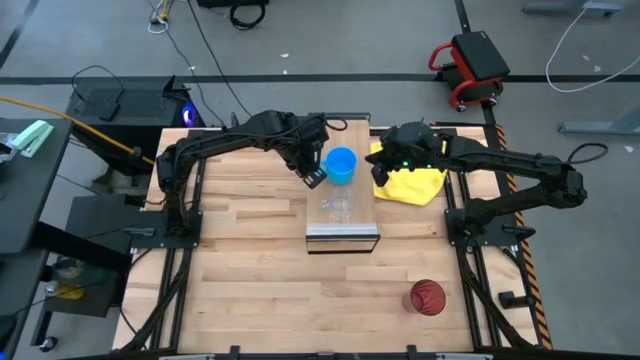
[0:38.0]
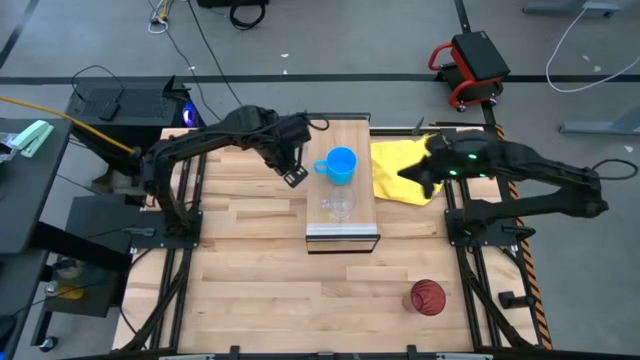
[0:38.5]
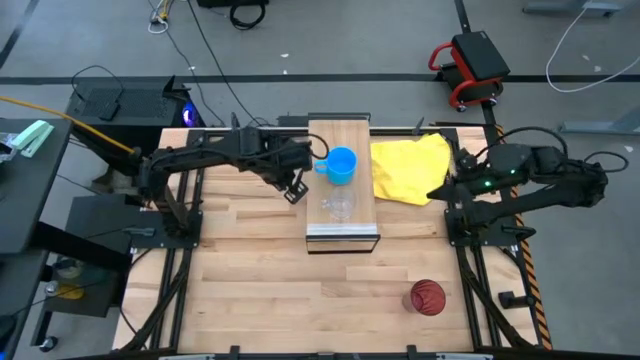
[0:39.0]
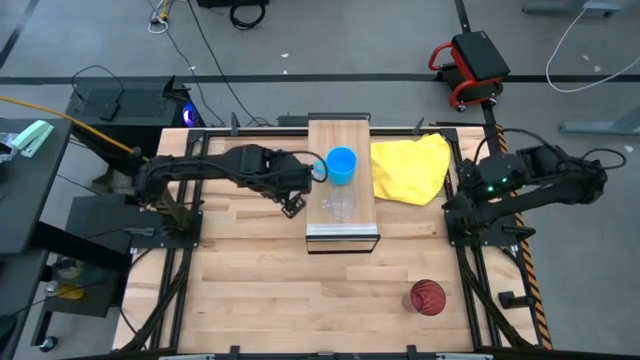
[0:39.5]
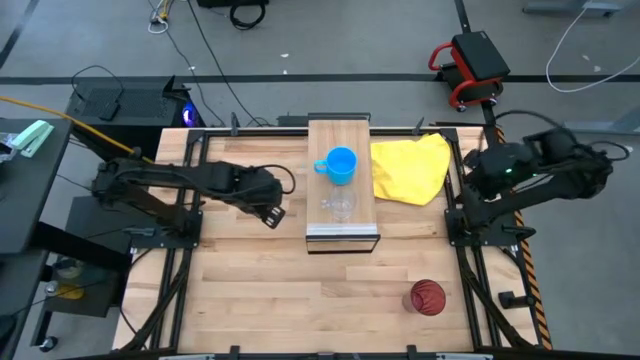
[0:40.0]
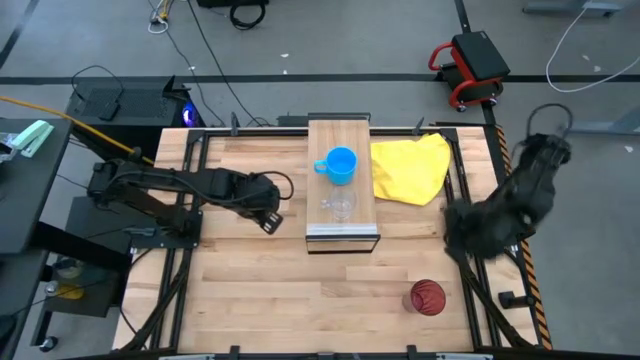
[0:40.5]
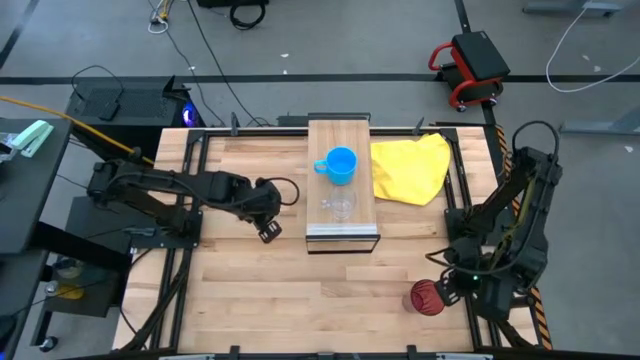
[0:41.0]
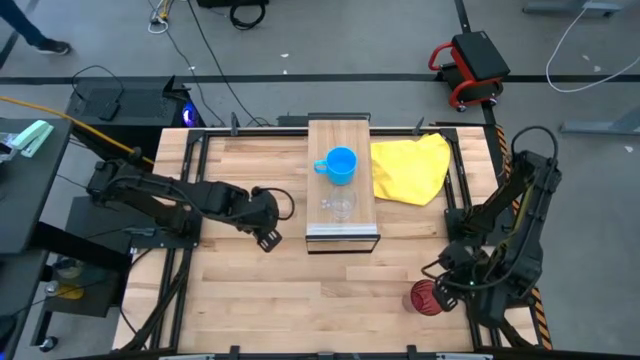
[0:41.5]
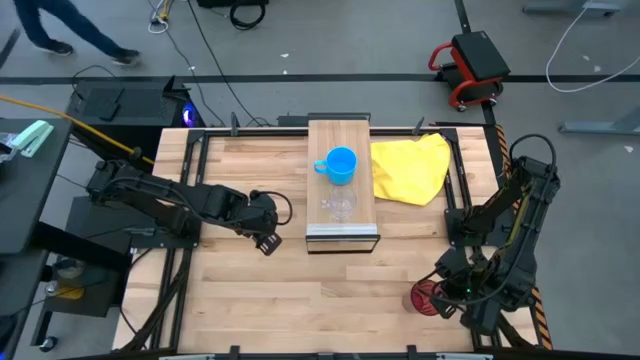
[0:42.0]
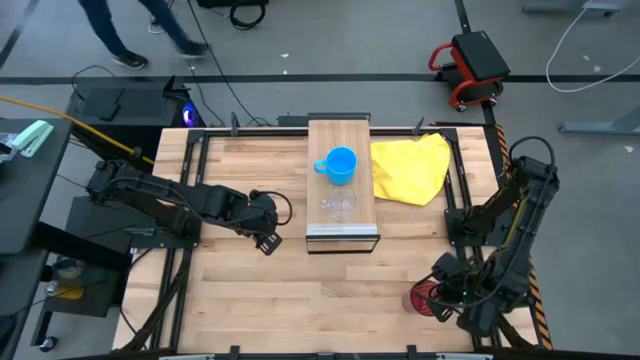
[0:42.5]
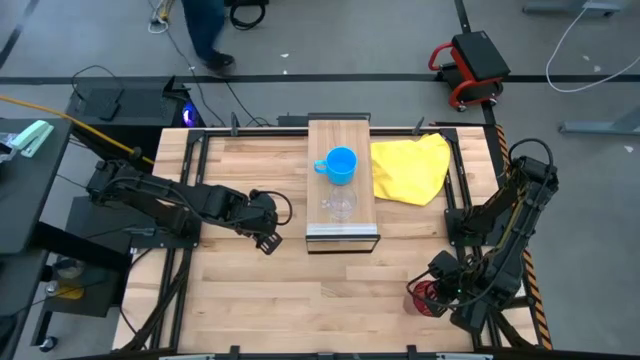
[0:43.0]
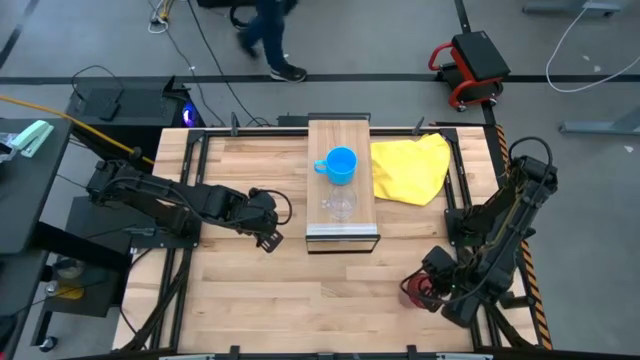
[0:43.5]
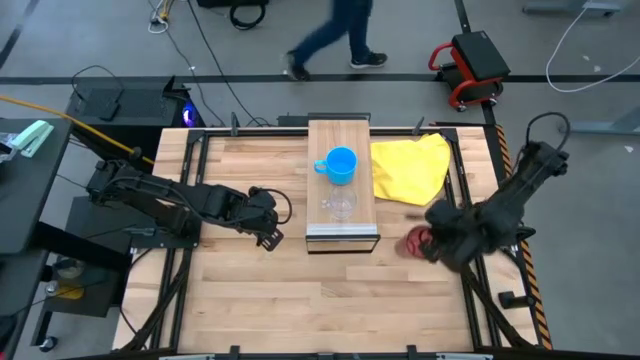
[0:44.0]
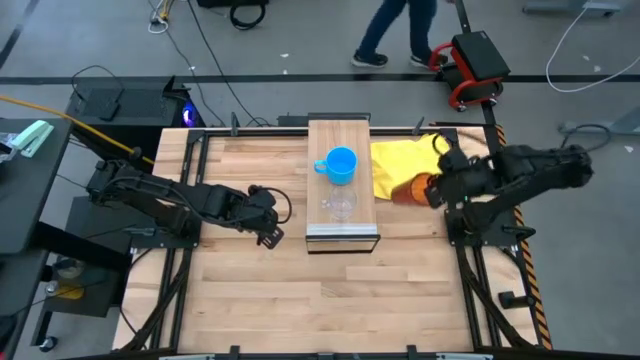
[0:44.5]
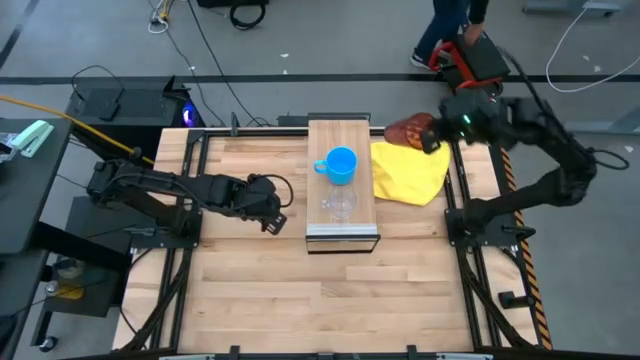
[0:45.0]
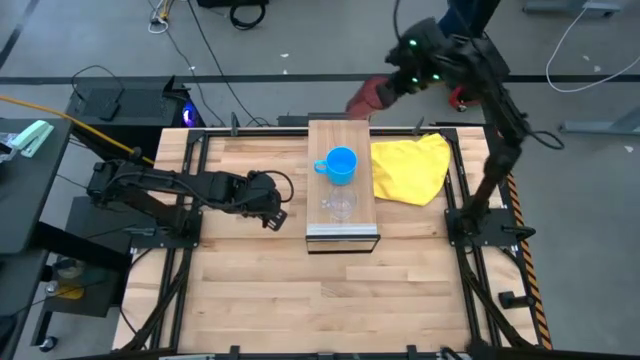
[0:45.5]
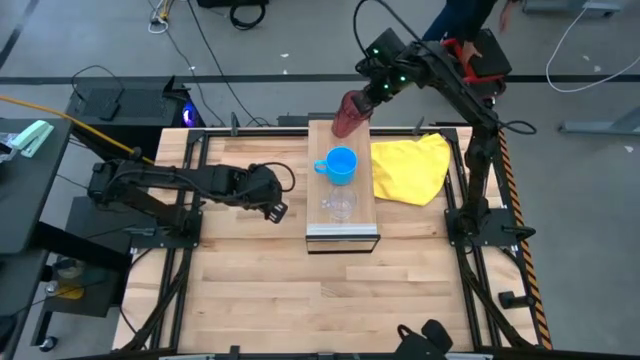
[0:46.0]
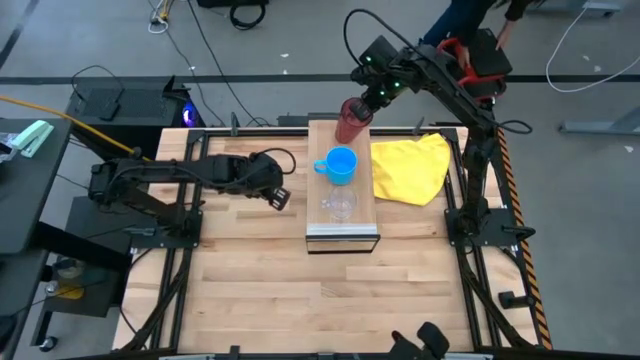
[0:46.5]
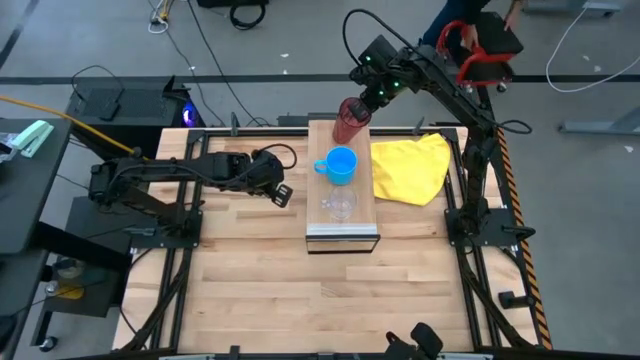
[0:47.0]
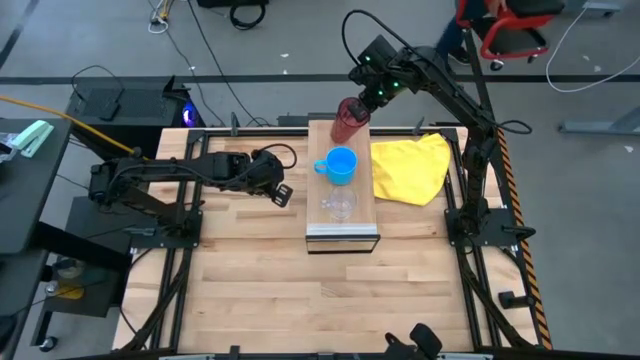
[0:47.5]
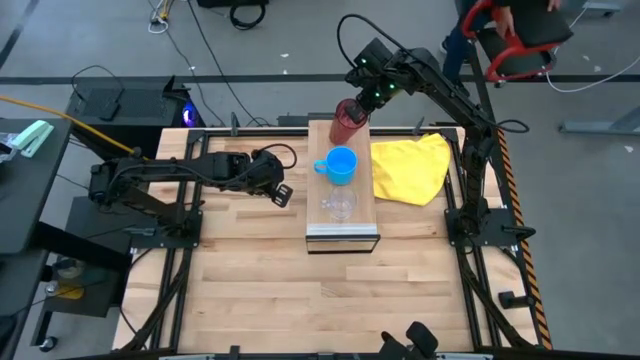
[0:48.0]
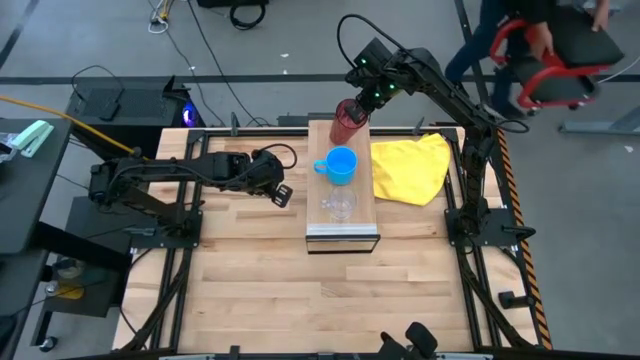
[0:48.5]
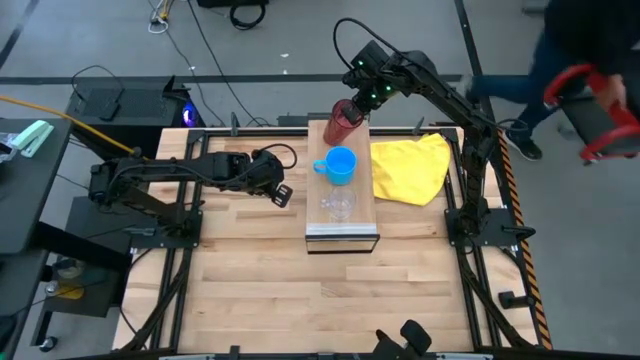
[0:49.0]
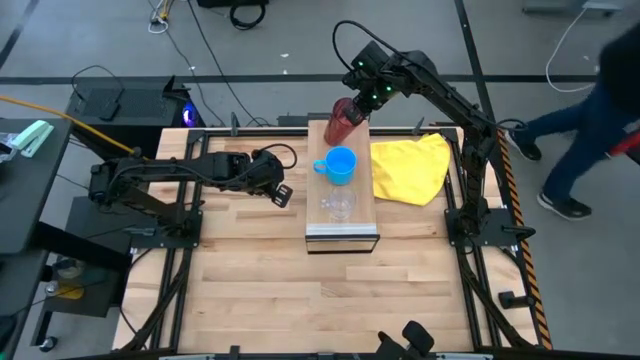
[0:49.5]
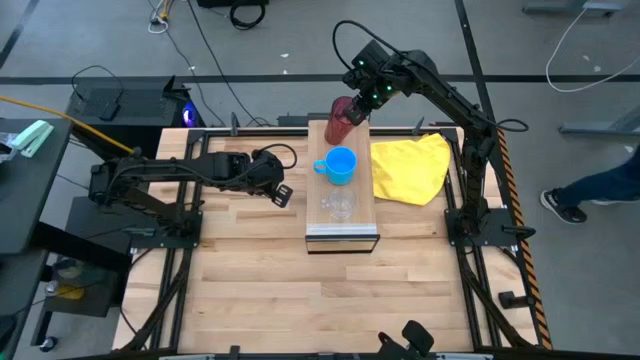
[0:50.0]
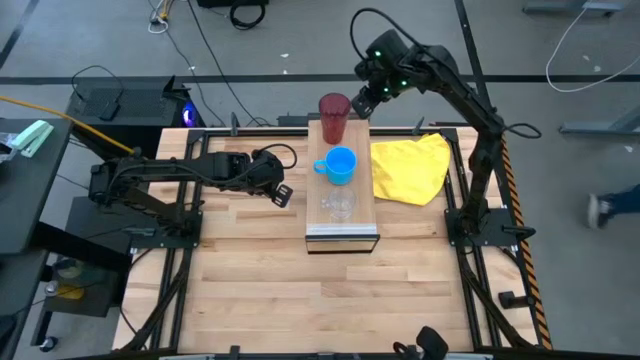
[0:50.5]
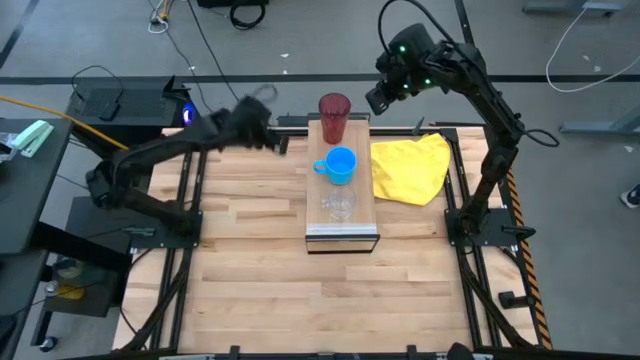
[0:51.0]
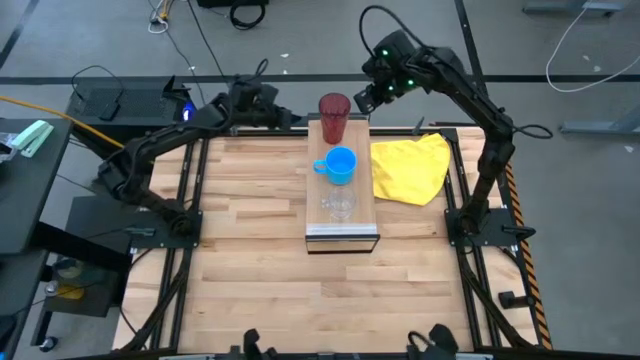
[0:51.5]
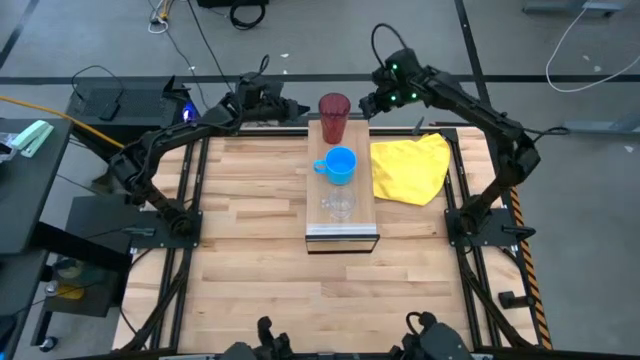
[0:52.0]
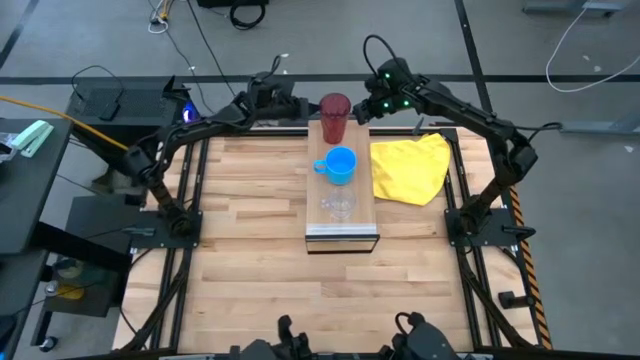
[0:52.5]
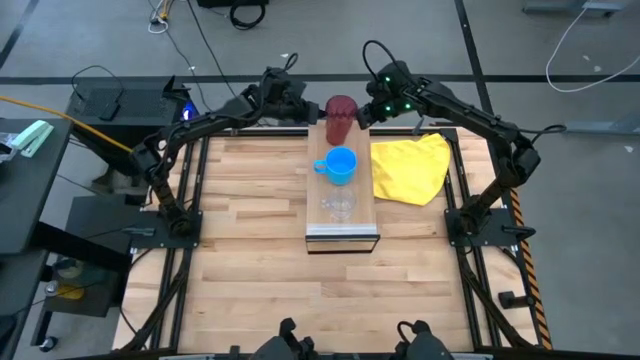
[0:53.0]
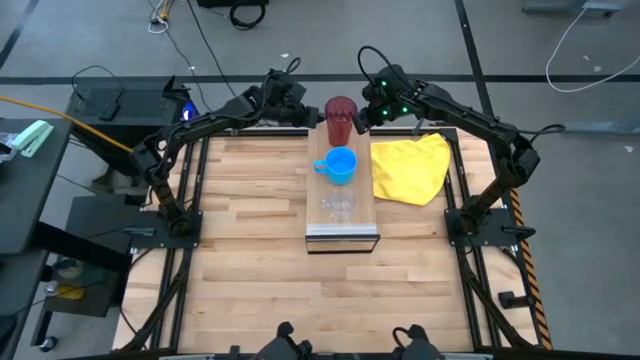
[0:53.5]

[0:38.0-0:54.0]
Task: Stack small to large cups/mugs on shelf
Put the red cup on the shelf

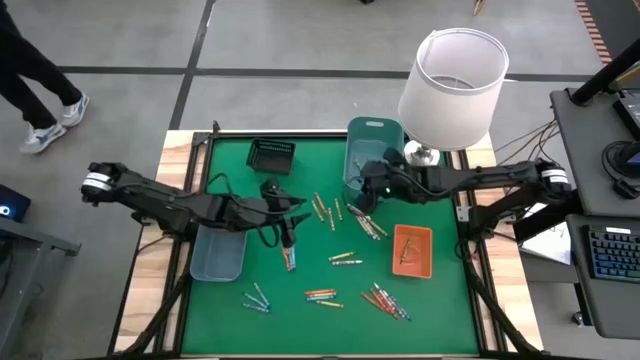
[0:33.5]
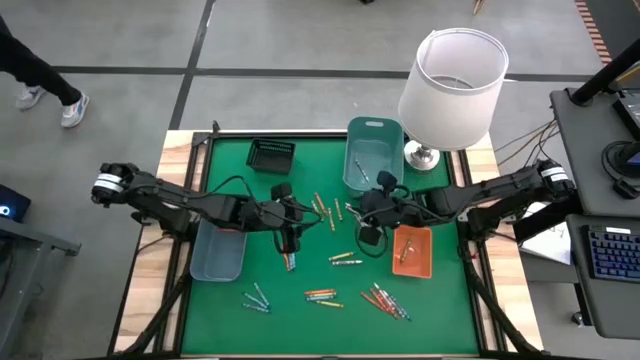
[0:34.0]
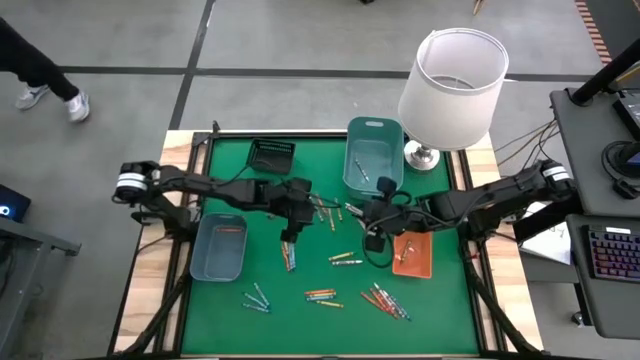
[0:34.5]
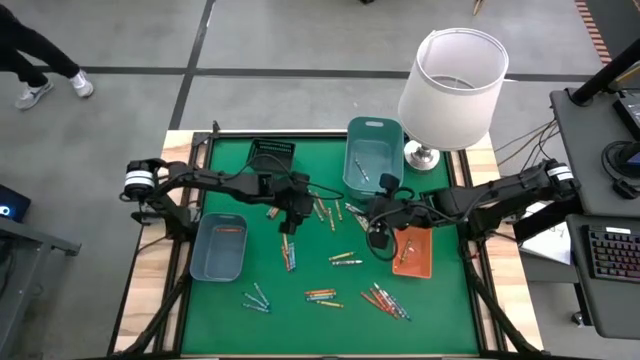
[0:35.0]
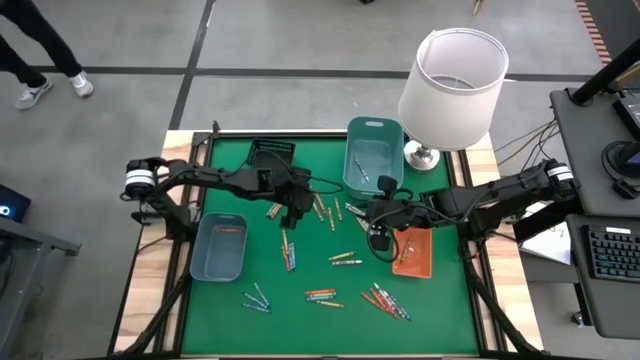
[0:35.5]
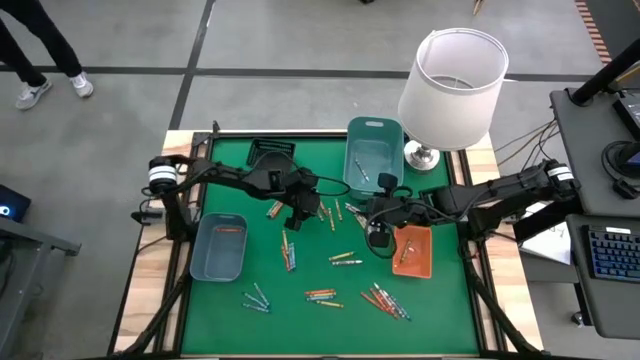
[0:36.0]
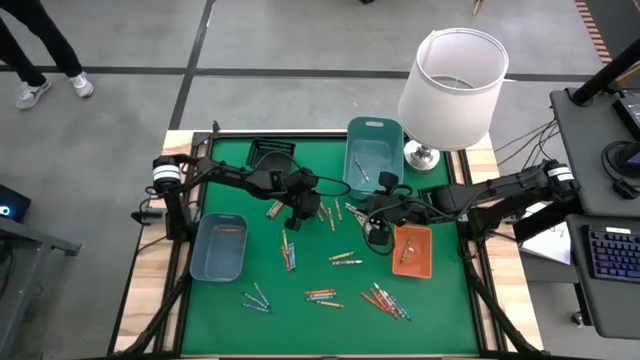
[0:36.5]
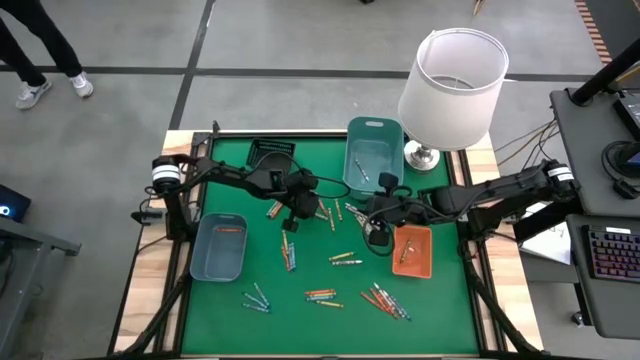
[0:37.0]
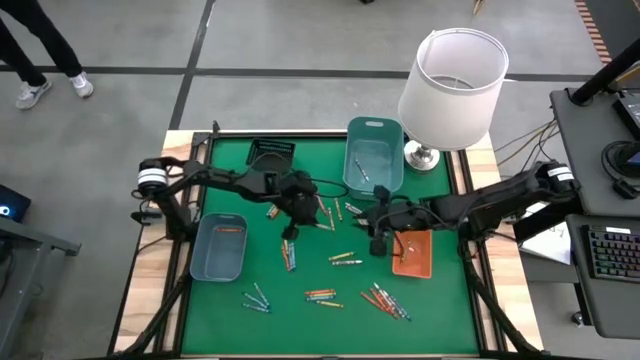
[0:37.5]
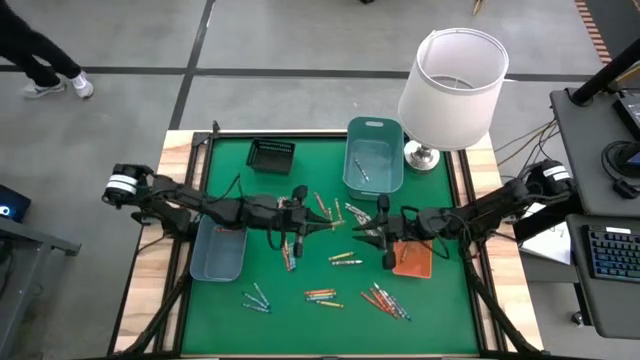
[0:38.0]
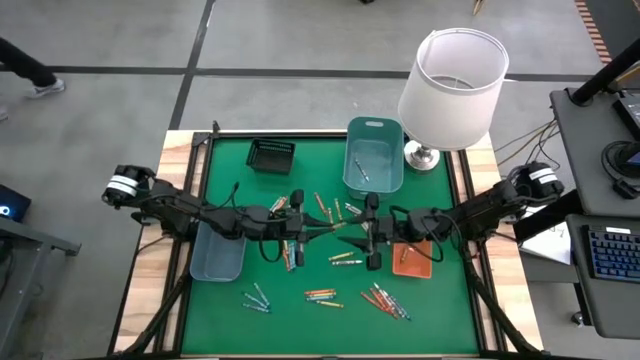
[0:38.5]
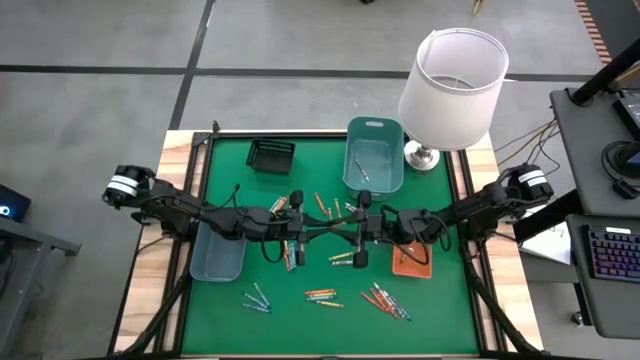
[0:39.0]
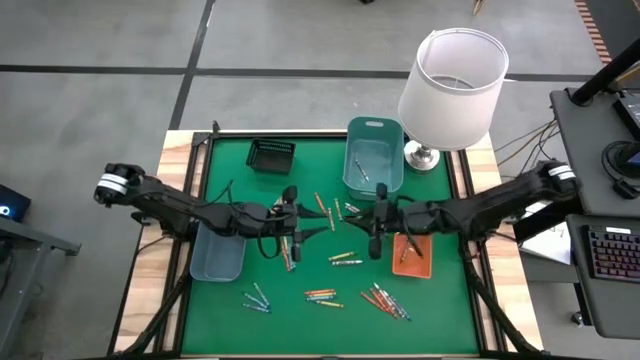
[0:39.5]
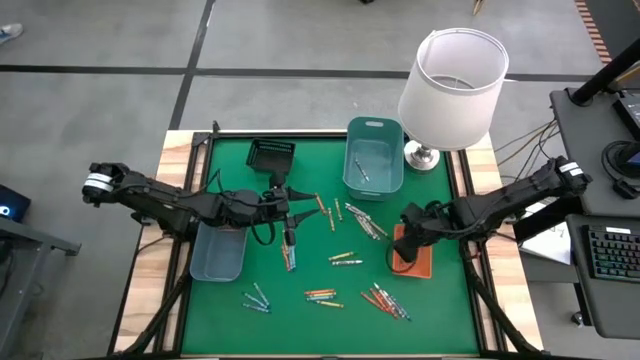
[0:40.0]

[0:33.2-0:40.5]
Task: Sort crayons
Put the green crayon into the orange bin
